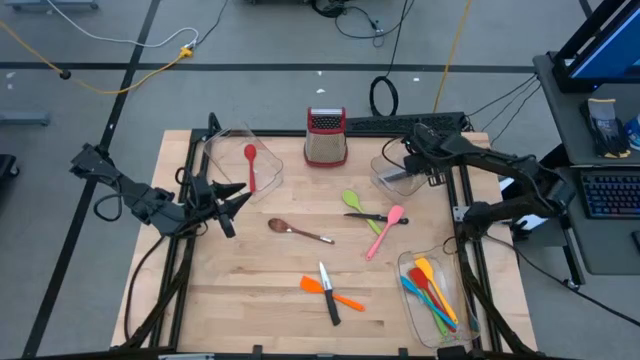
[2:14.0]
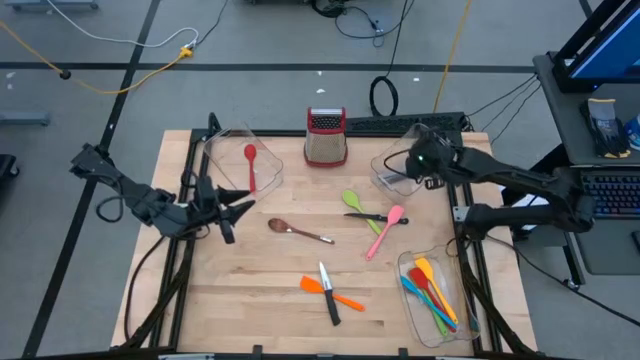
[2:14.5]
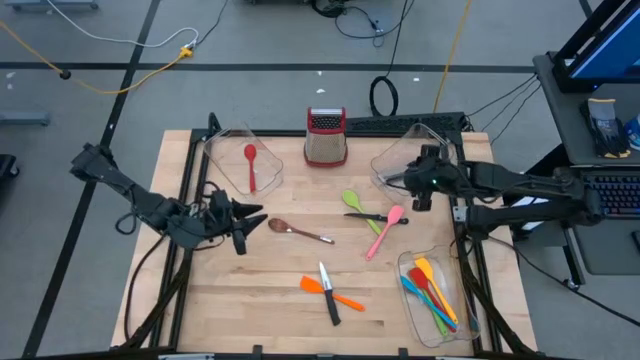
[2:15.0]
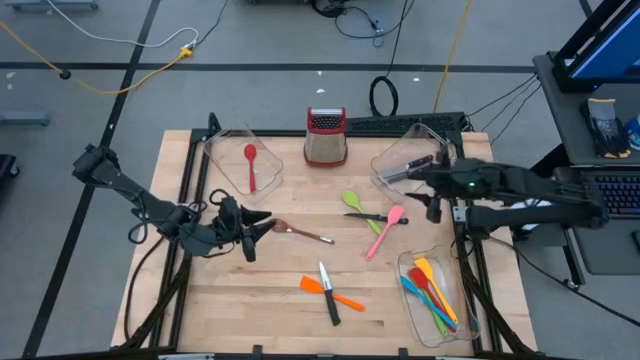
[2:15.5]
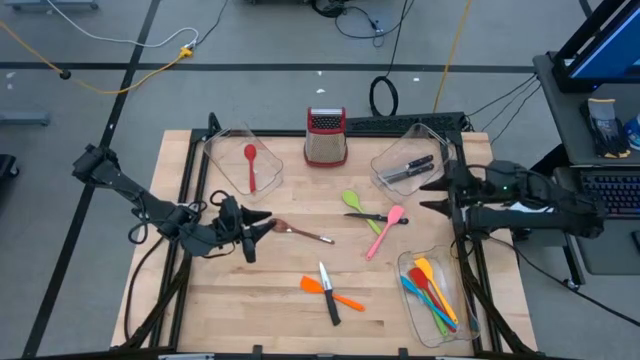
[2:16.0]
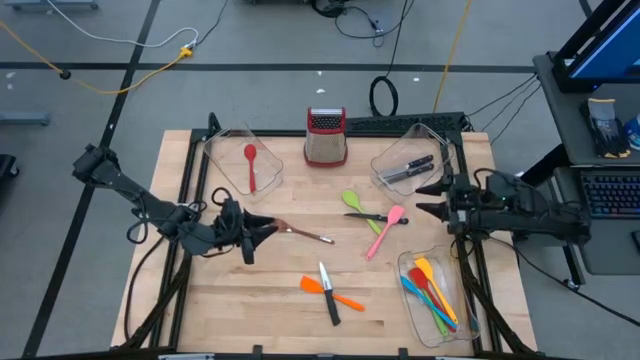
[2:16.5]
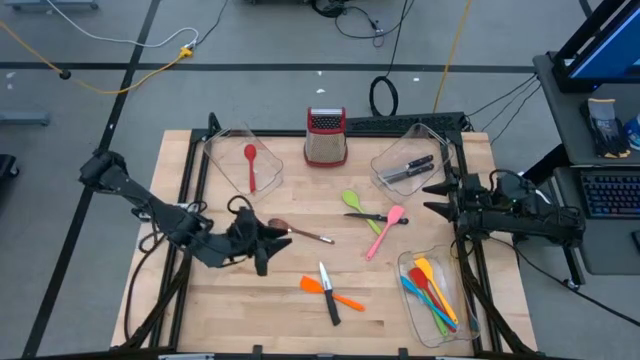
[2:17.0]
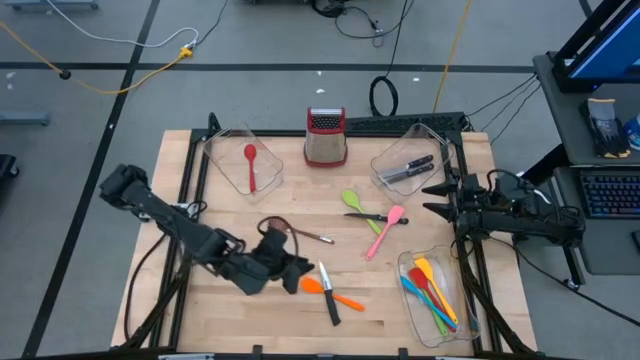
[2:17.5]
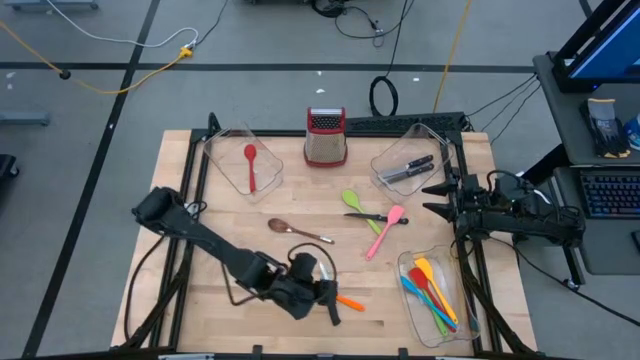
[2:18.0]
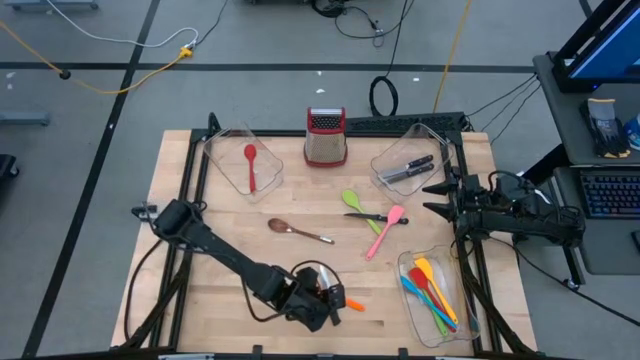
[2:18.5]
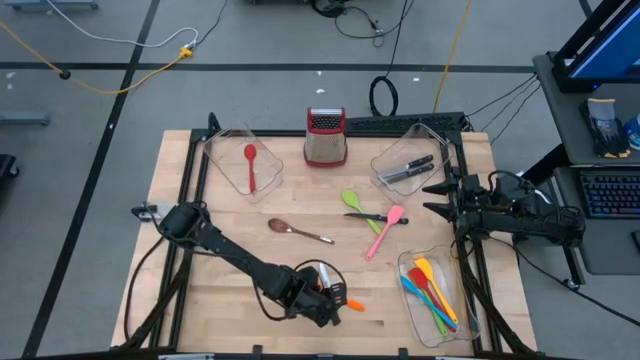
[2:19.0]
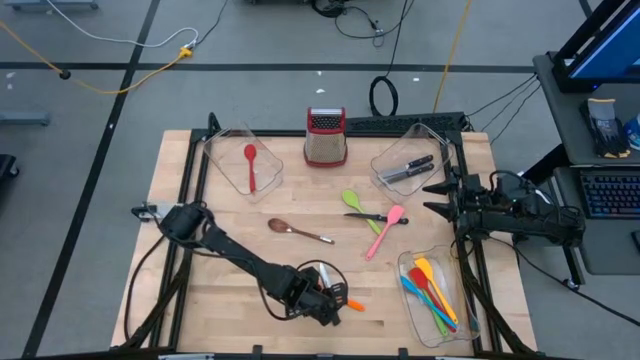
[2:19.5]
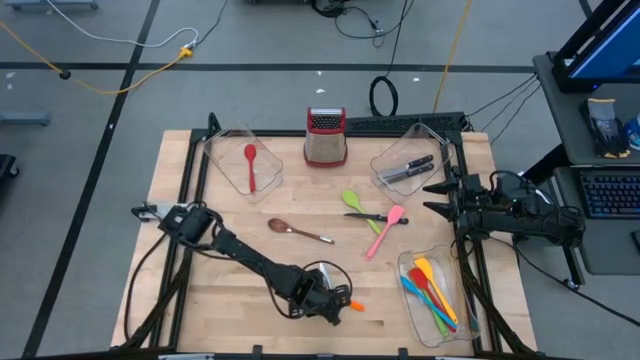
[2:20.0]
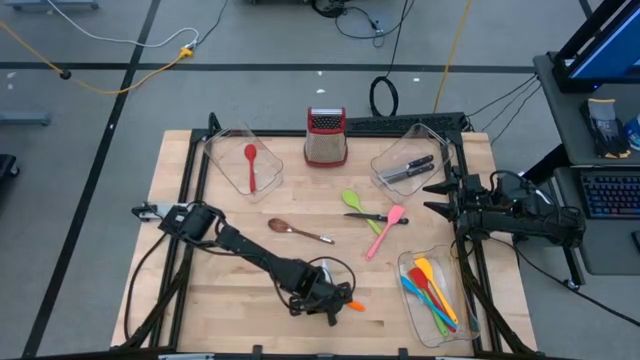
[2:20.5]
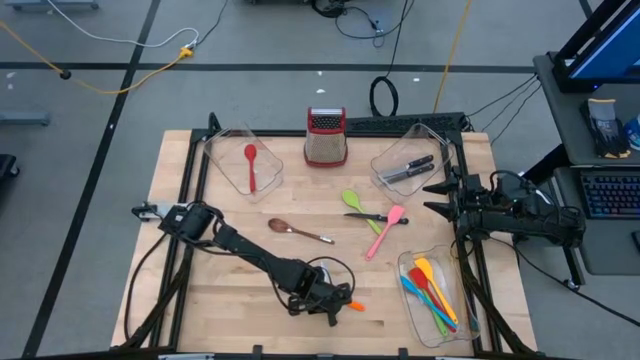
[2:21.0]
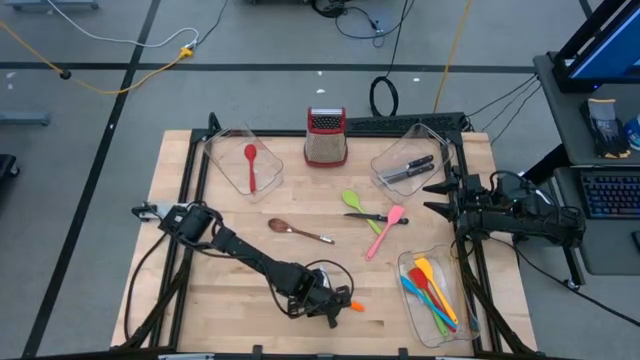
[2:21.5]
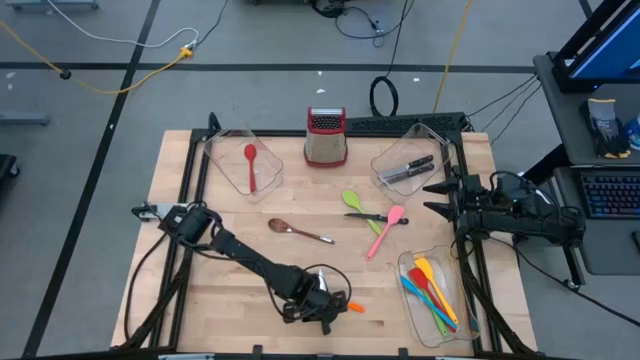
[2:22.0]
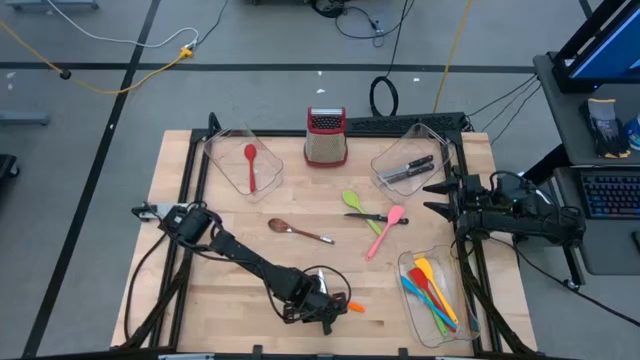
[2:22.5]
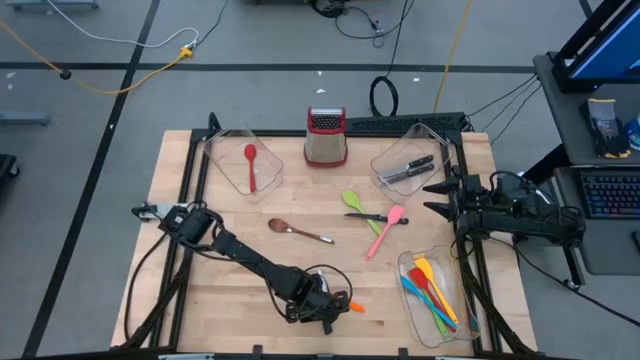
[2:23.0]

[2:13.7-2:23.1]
Task: Pick & Place Kitchen Items
Put the silver kitchen knife into the top right transparent bin

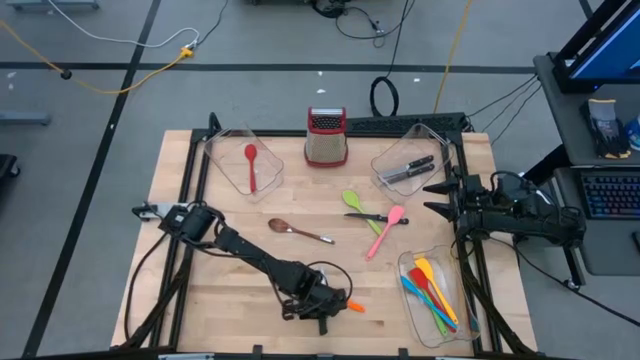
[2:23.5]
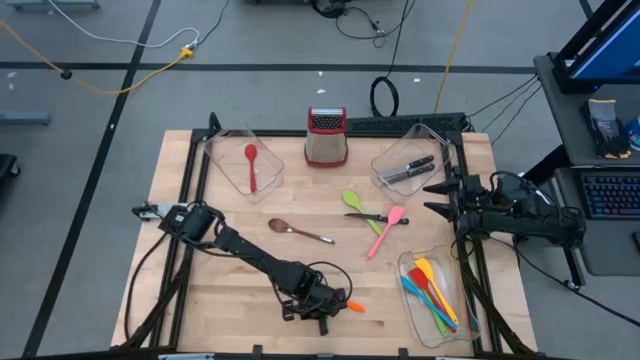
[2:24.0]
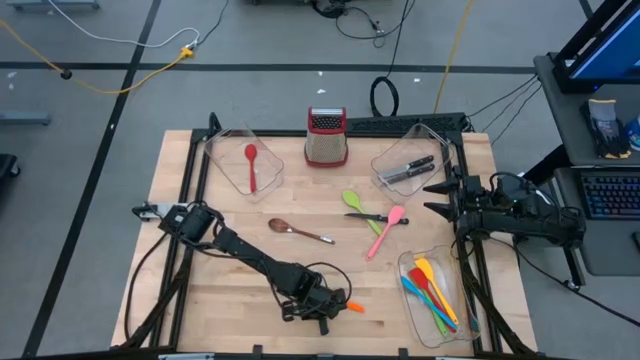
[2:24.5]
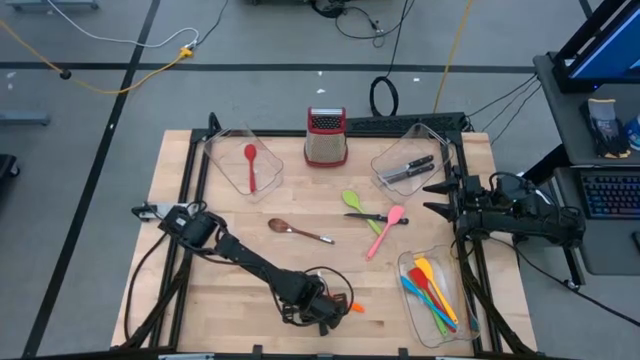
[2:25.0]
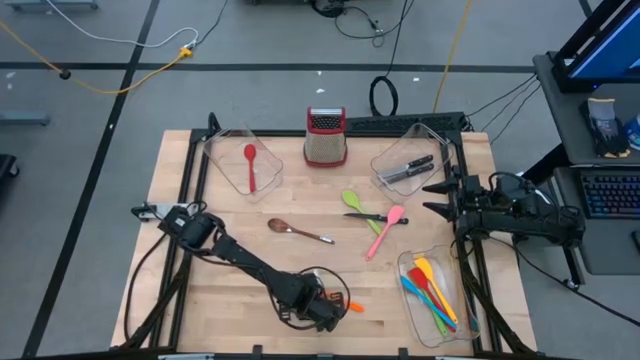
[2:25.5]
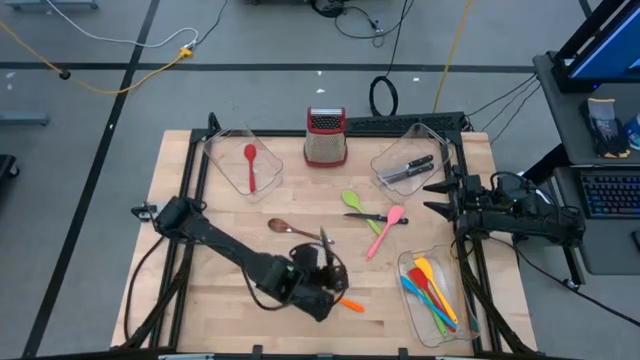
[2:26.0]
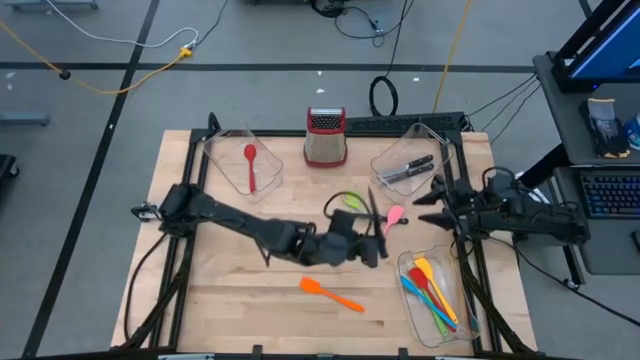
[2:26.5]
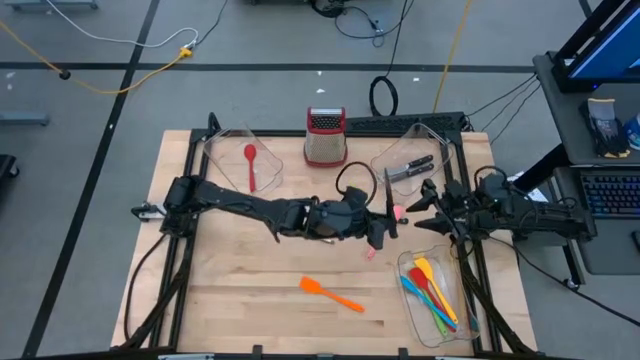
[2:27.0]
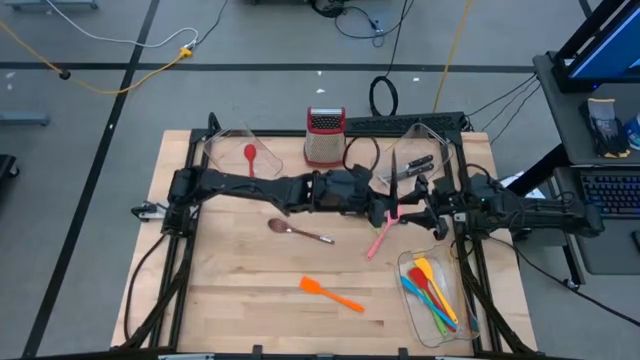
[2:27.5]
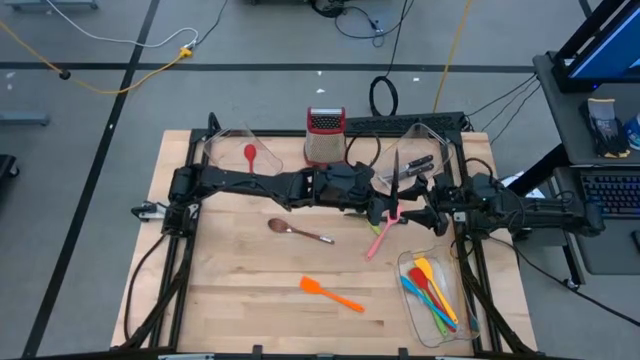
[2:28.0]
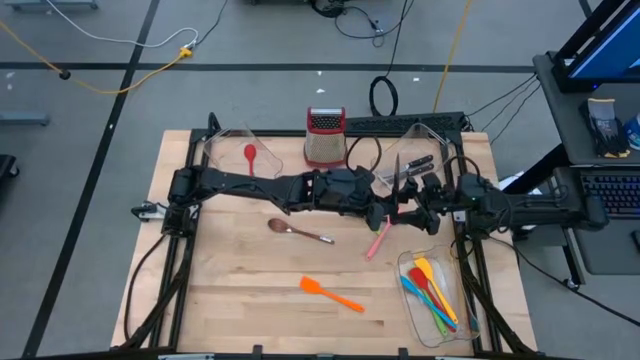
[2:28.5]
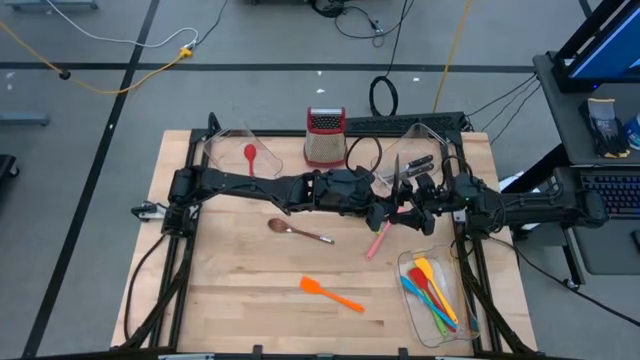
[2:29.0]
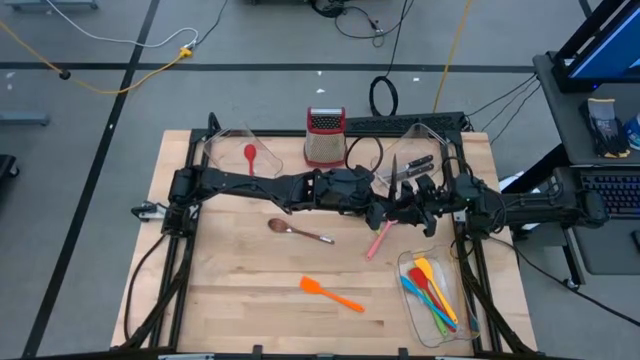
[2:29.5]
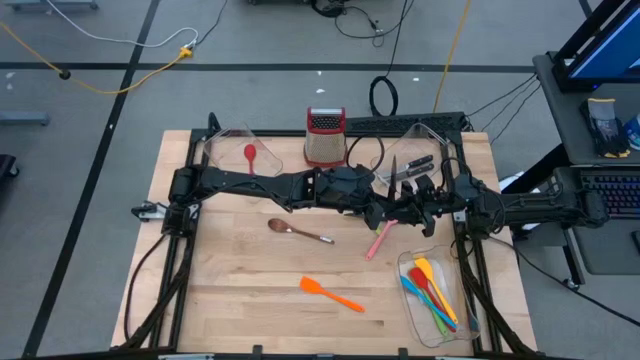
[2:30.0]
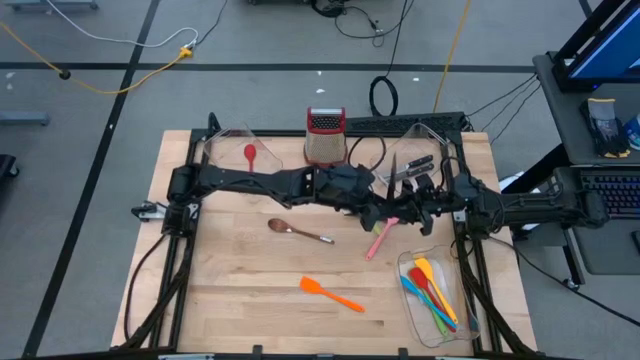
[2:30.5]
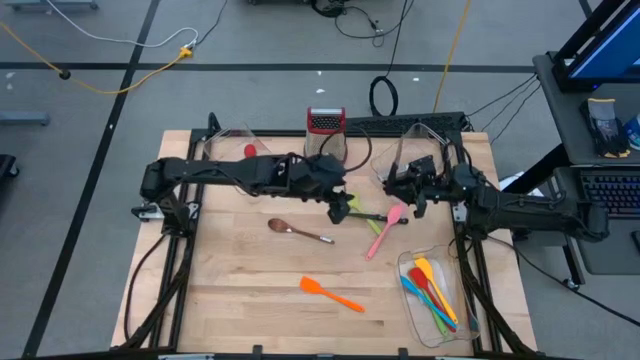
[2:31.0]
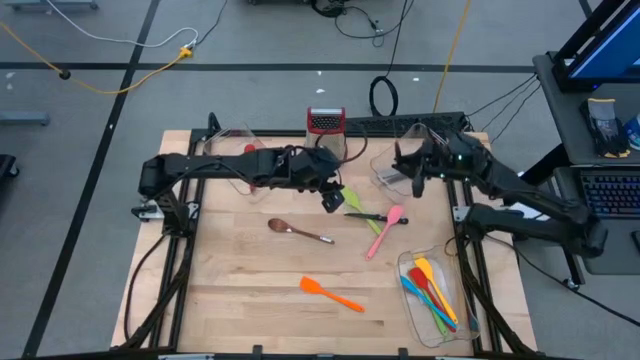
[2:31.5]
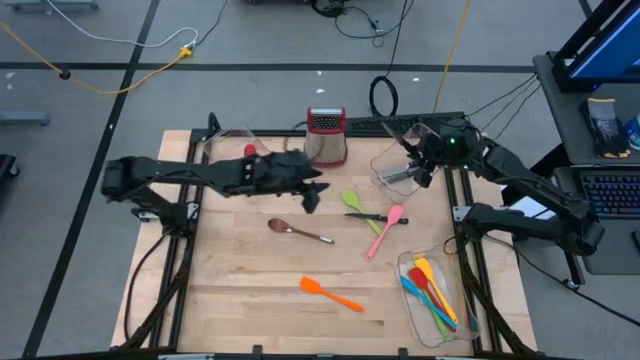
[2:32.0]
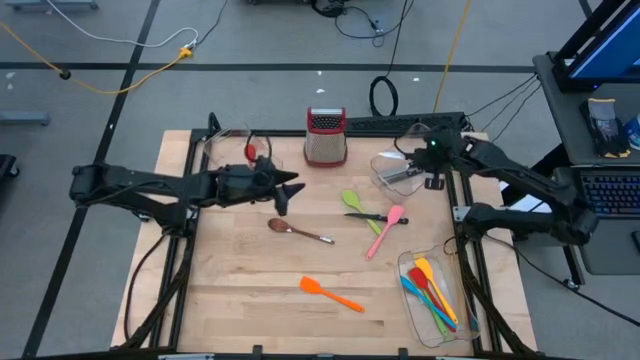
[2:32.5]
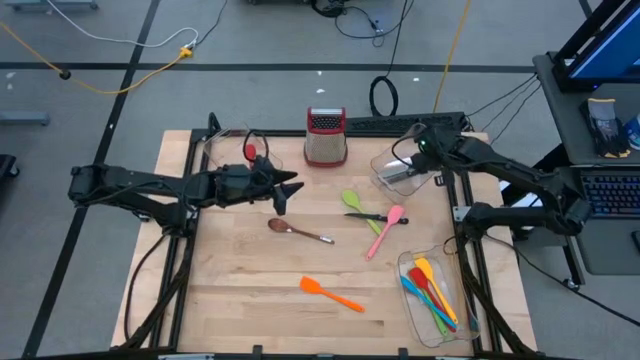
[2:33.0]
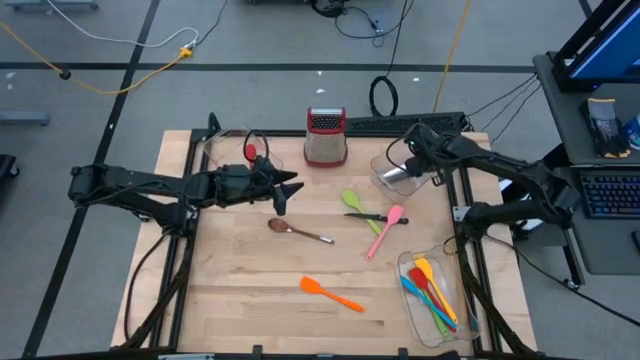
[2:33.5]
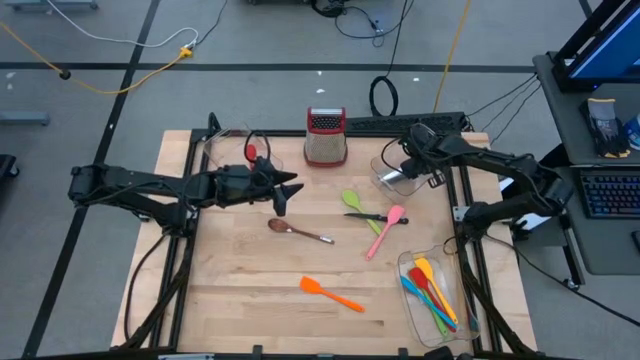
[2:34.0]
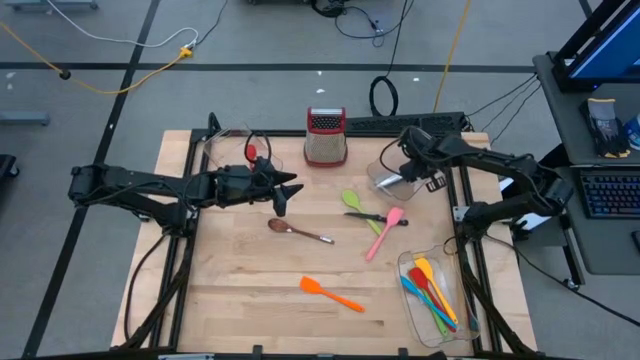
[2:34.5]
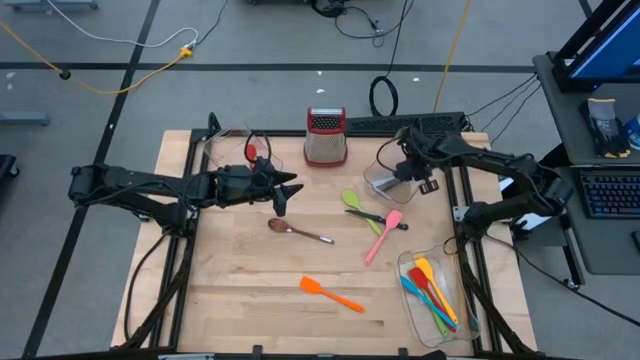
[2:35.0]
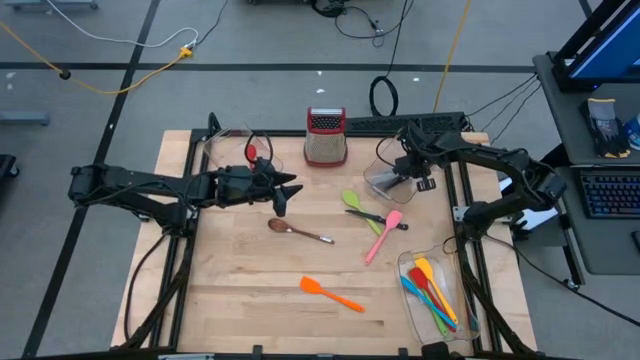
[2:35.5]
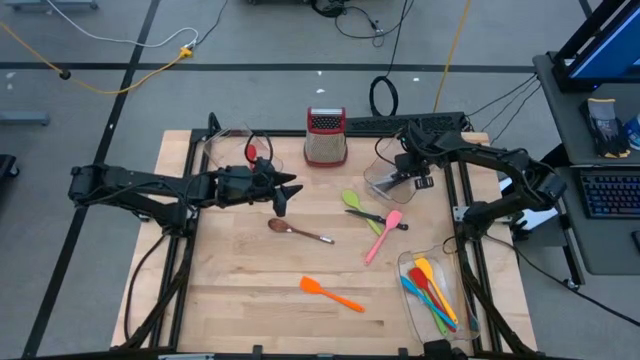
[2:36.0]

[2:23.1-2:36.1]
Put the silver kitchen knife into the top right transparent bin
